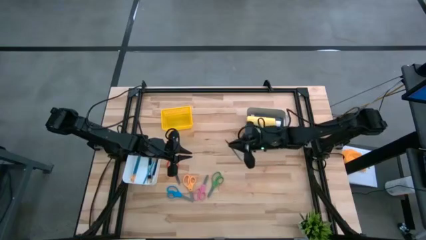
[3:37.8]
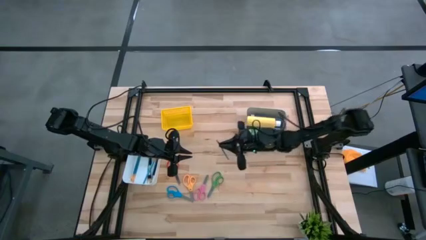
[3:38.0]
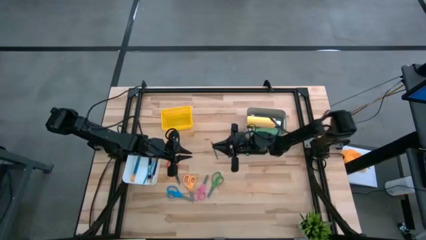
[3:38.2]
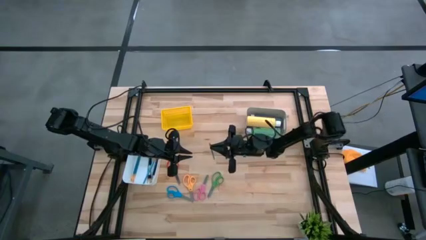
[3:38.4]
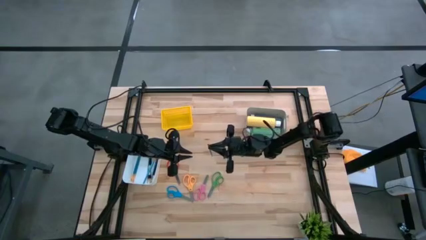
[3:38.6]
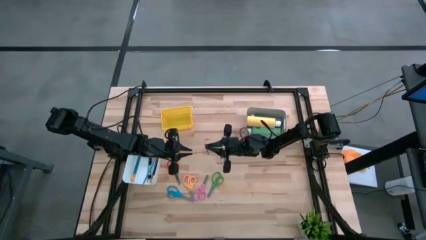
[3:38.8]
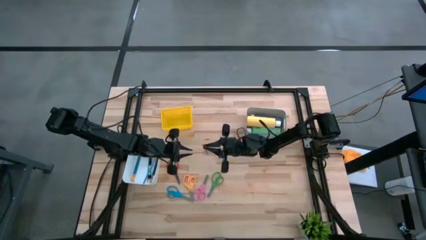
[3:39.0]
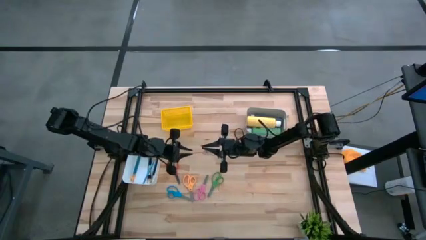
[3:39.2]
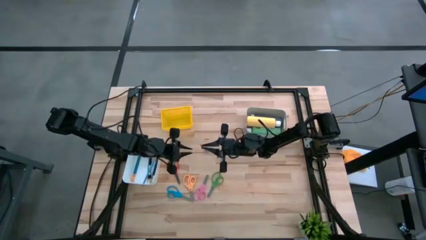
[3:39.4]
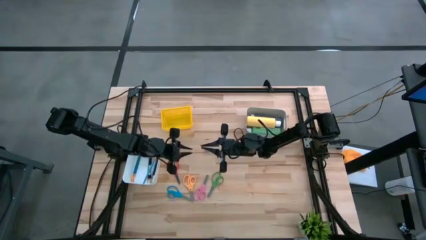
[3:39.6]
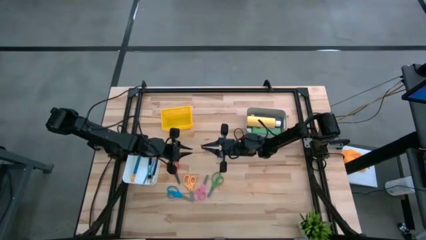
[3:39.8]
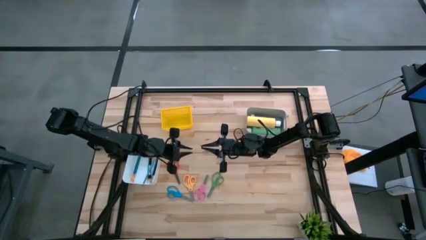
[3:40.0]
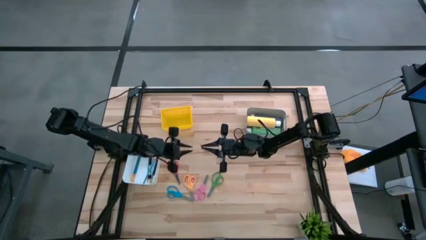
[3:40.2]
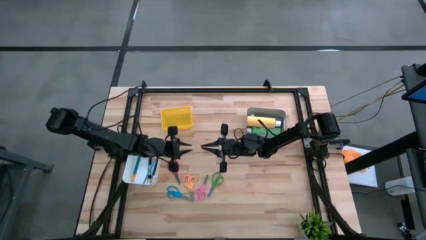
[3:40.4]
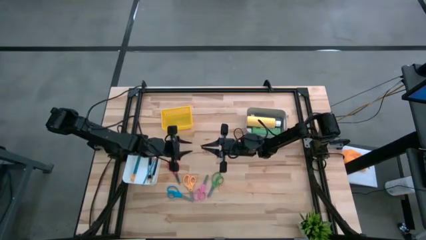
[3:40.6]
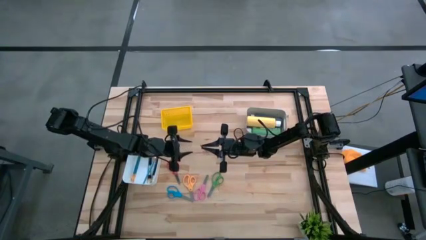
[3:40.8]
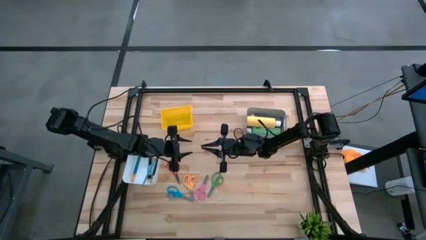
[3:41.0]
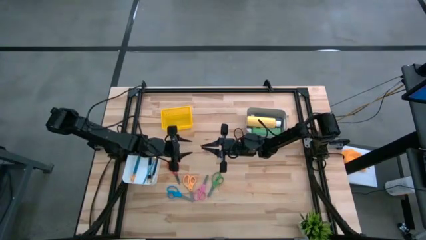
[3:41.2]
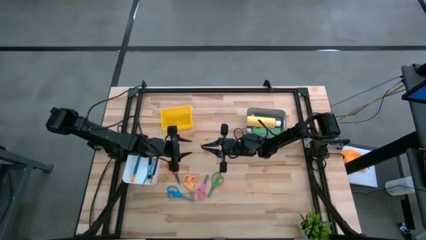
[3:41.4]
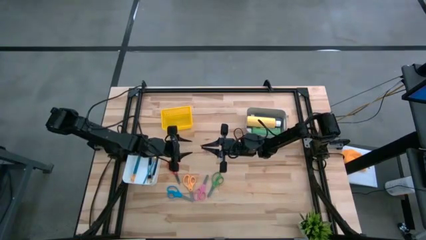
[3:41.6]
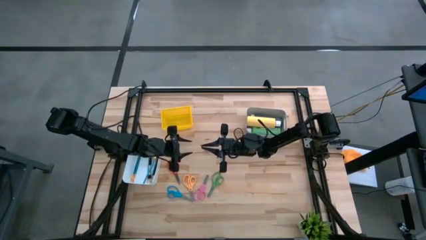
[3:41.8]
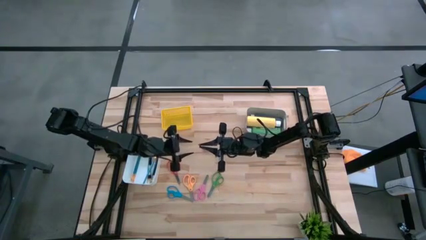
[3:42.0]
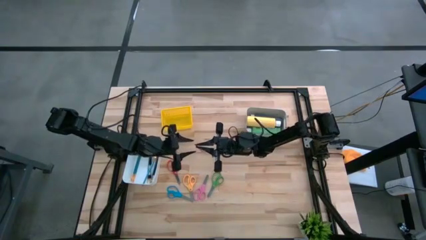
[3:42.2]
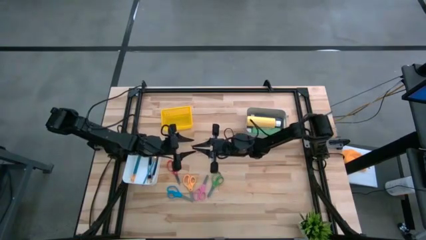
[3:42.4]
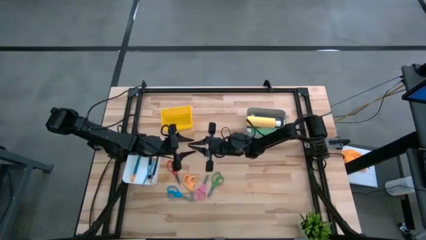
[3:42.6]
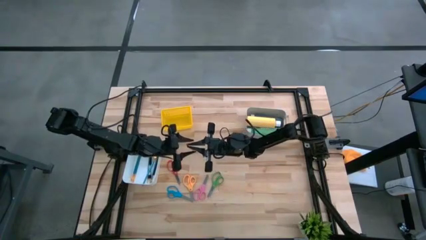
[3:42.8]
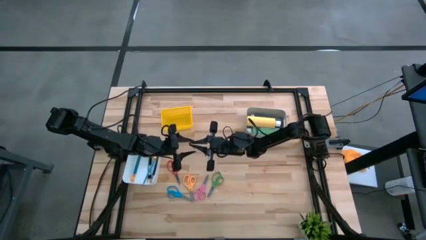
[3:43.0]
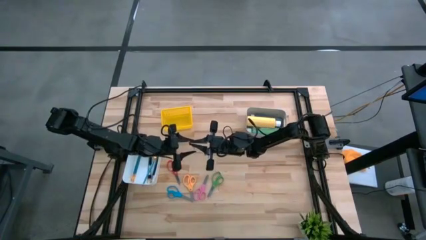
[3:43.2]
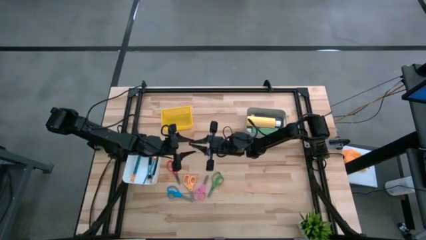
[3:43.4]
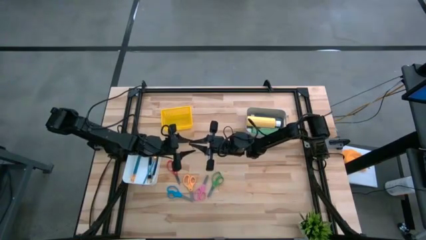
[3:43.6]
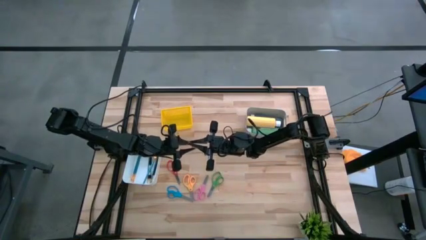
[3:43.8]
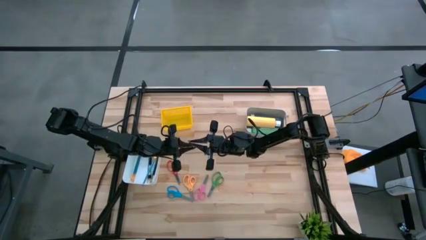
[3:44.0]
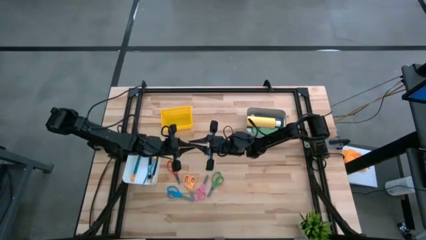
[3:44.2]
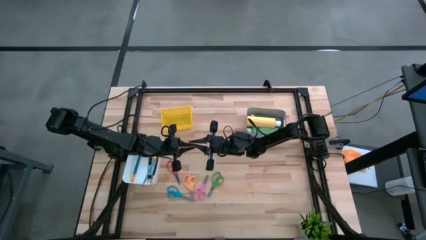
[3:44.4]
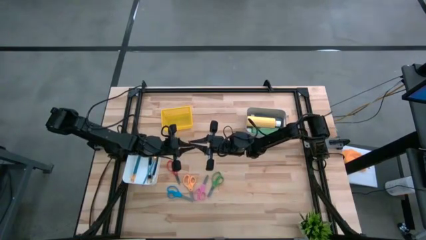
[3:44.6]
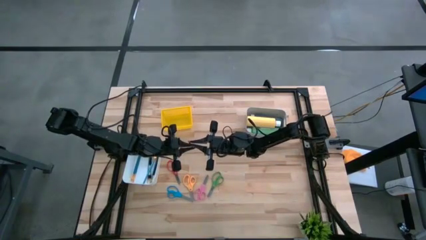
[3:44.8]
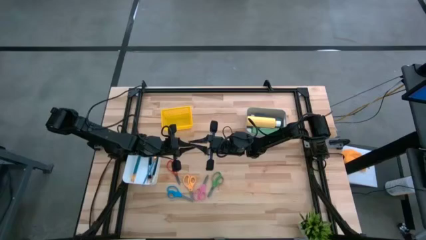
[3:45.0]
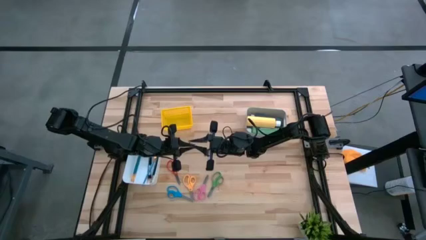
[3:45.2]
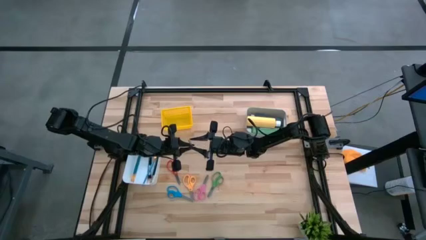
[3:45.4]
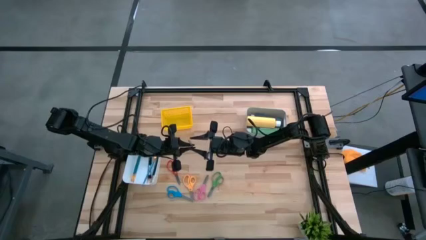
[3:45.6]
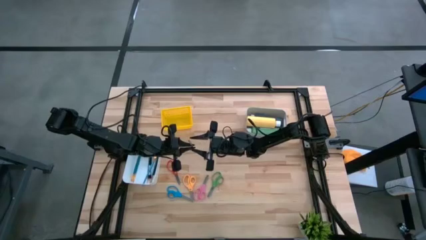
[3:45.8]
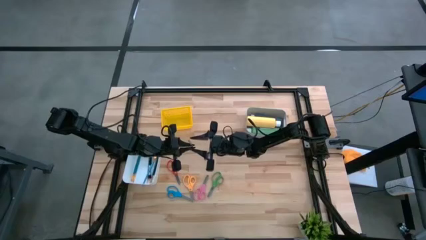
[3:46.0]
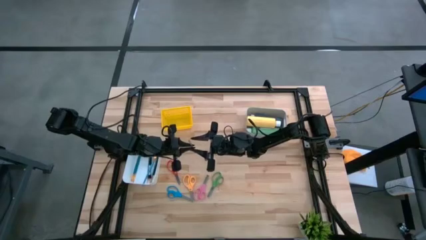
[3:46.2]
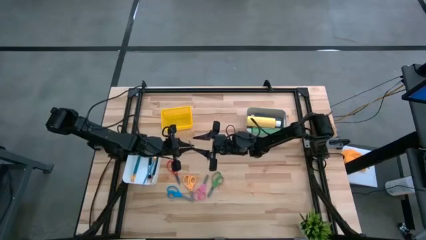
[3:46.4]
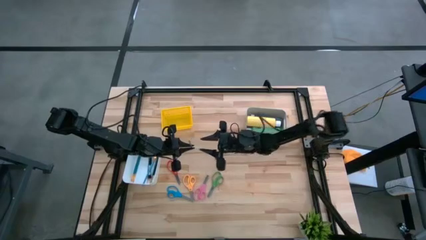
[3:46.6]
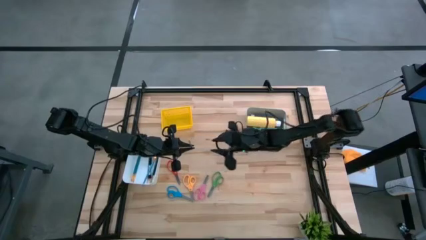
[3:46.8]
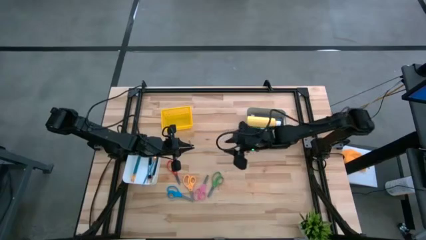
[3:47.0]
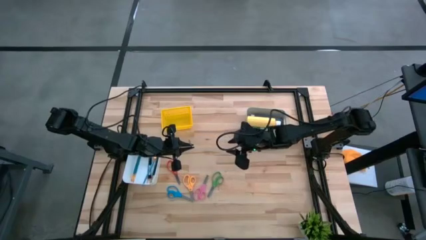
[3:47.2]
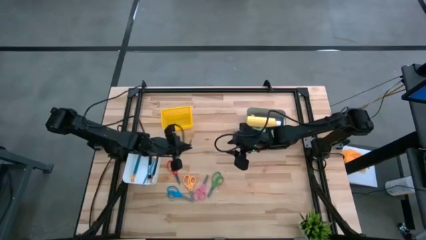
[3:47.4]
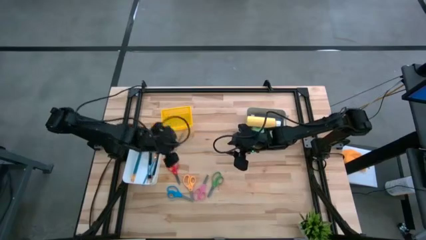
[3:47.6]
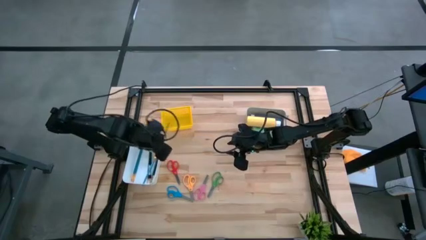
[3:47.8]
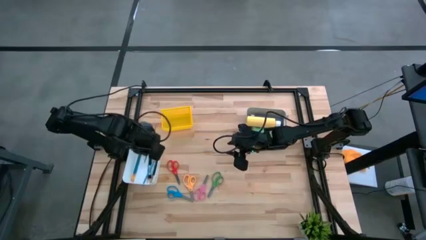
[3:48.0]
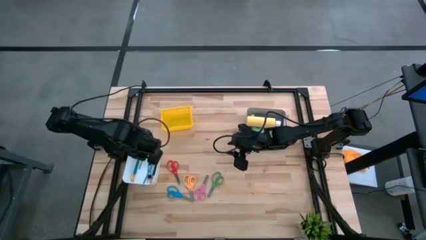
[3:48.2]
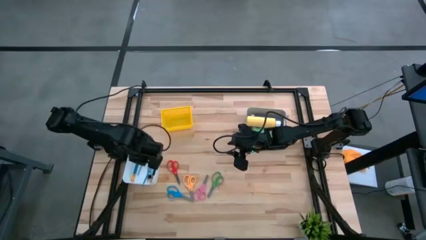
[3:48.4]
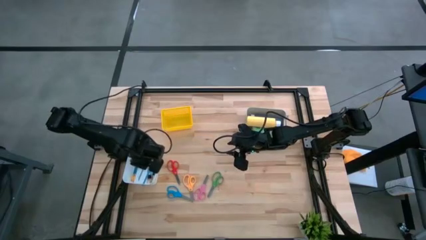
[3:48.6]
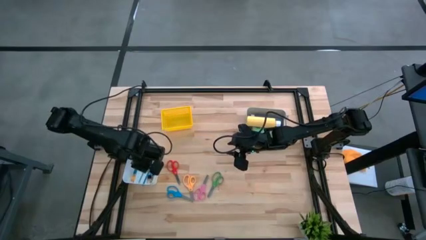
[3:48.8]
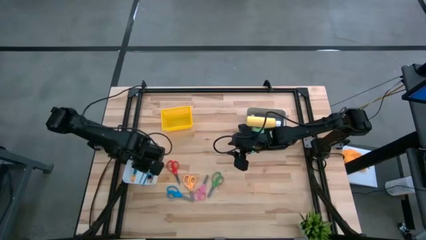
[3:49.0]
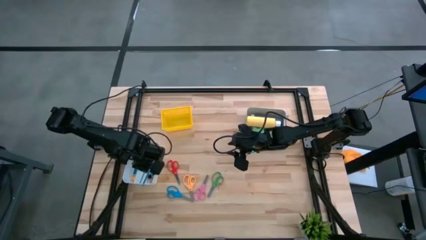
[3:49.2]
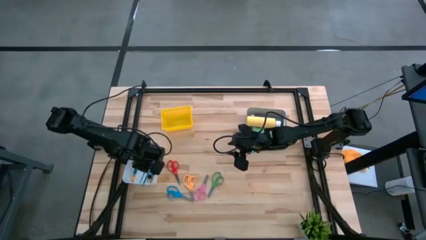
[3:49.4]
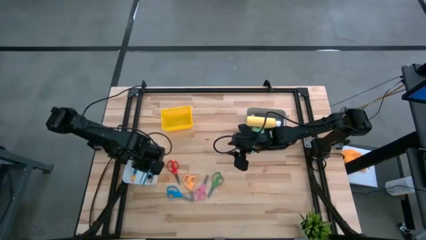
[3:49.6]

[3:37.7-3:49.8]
Task: Pick & Place Paint Supplies
Put the blue paintbrush into the white bin

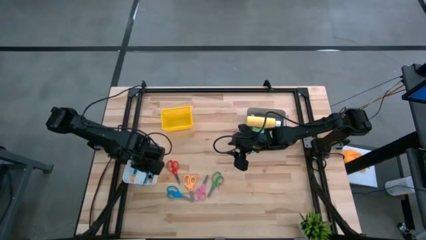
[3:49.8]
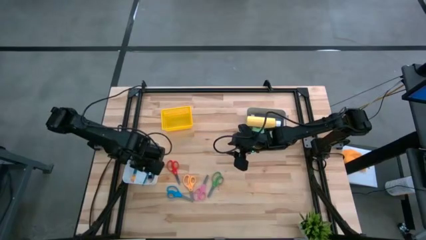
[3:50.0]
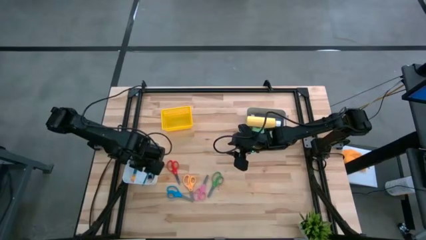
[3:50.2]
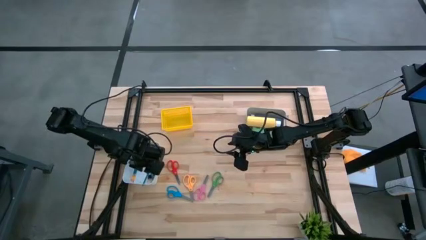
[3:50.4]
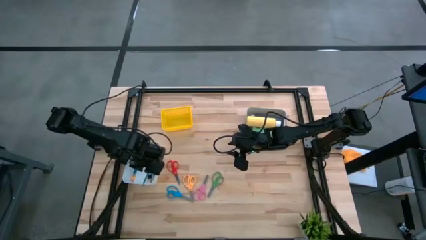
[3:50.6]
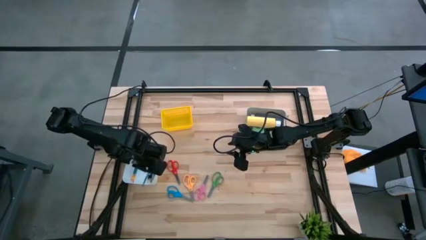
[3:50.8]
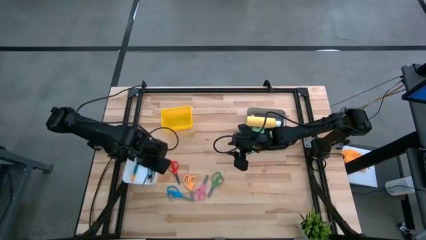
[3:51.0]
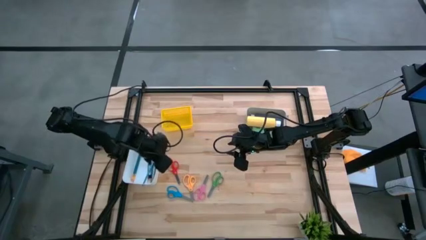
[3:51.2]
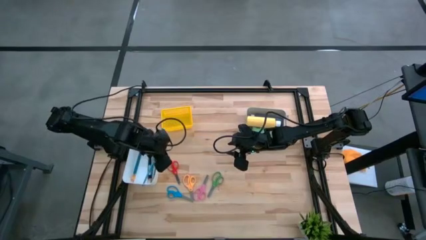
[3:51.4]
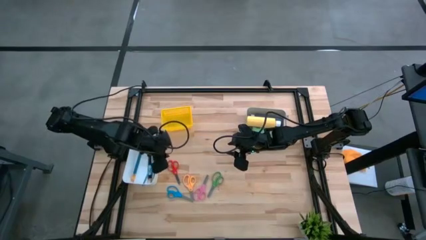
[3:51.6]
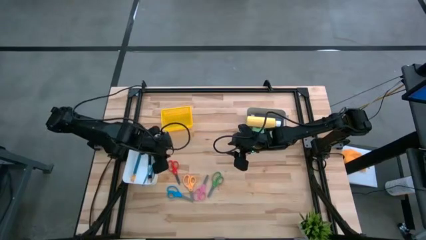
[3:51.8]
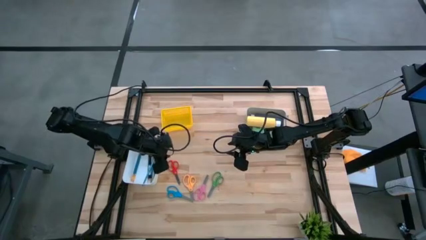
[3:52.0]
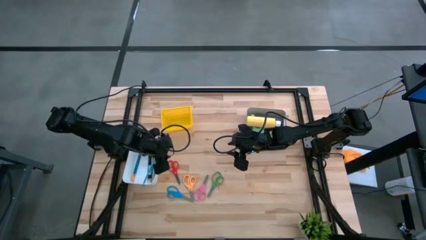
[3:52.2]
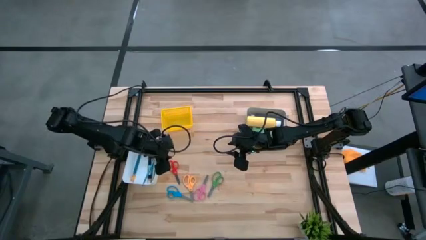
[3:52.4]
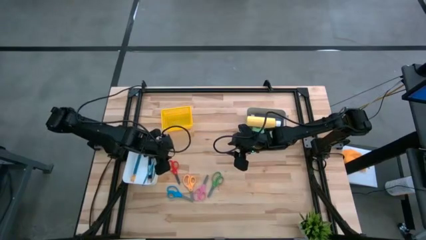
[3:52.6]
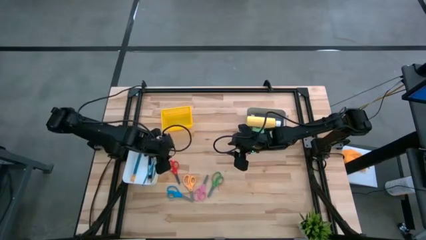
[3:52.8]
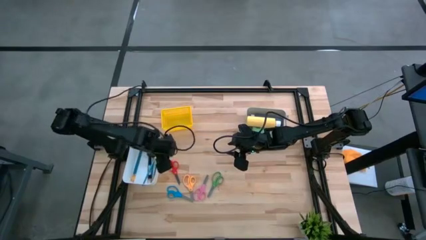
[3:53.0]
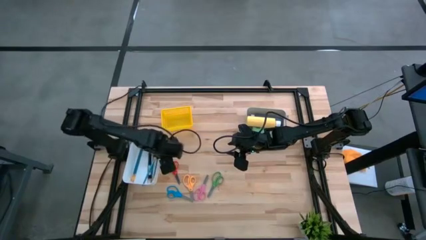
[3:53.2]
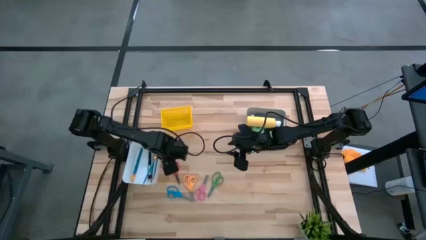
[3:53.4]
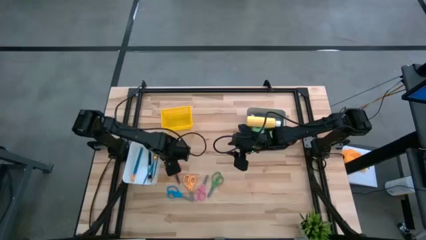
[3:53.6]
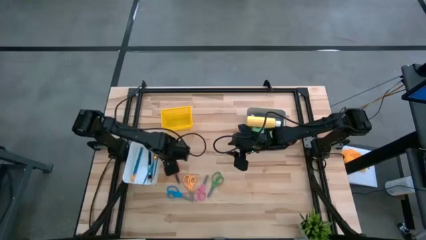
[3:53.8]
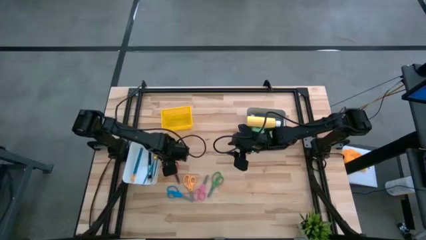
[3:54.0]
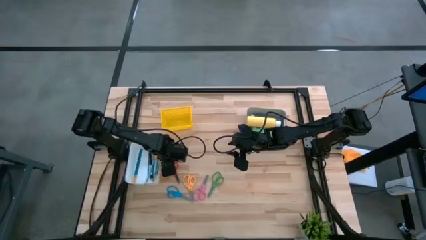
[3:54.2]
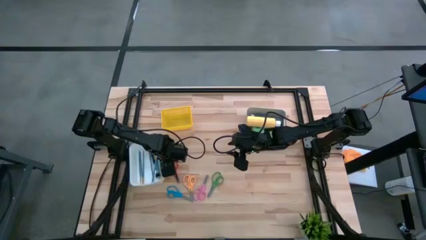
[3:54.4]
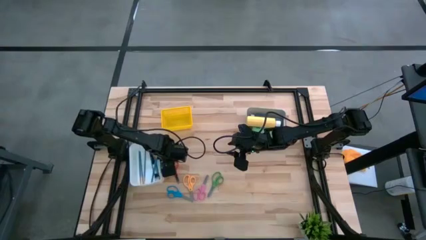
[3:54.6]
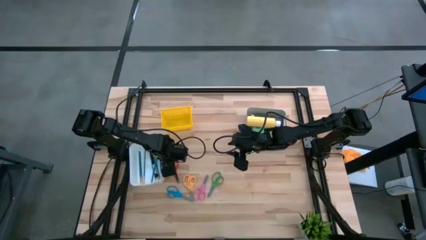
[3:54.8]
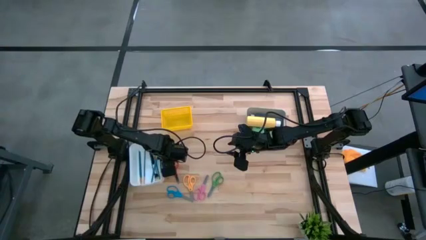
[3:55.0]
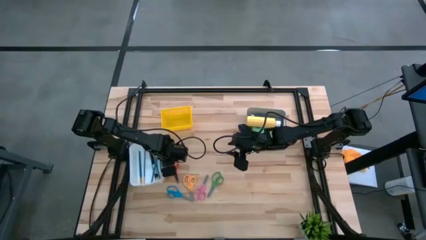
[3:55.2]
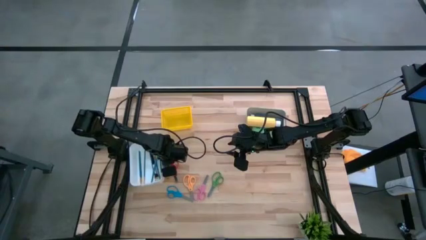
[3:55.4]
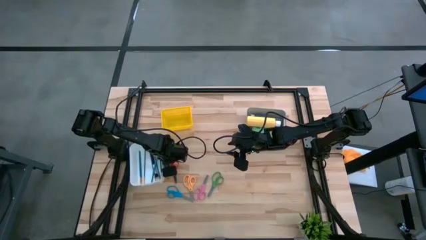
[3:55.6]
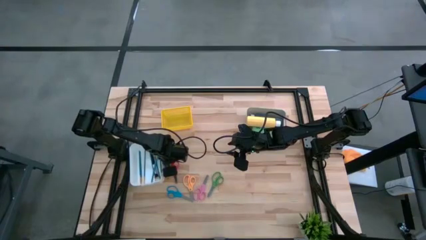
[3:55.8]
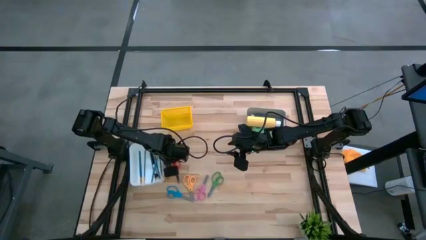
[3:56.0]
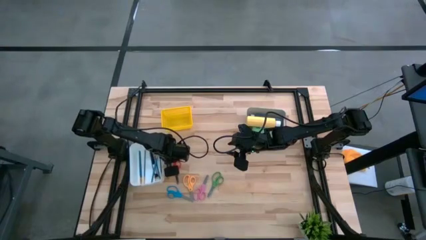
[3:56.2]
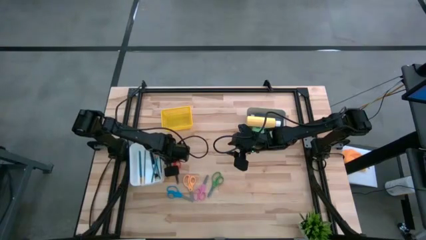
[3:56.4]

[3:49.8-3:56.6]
Put the pink scissors into the yellow bin
